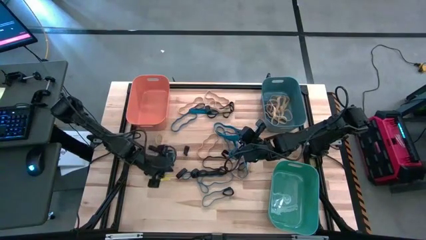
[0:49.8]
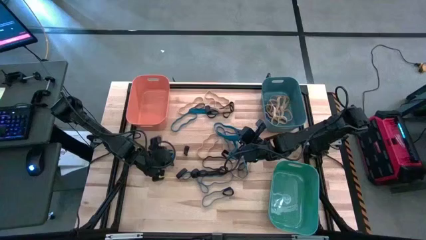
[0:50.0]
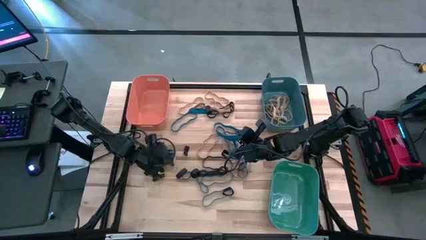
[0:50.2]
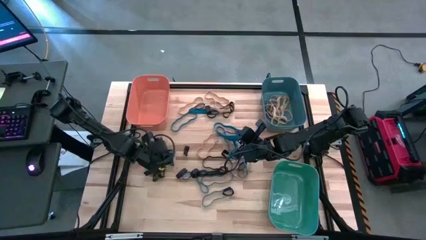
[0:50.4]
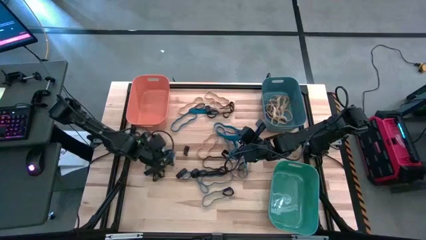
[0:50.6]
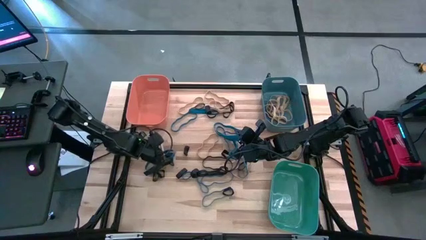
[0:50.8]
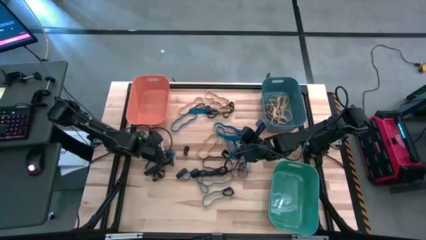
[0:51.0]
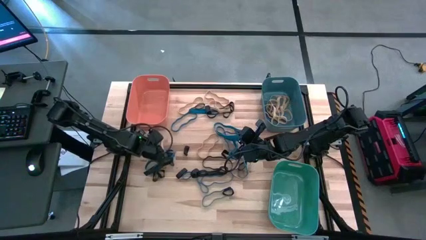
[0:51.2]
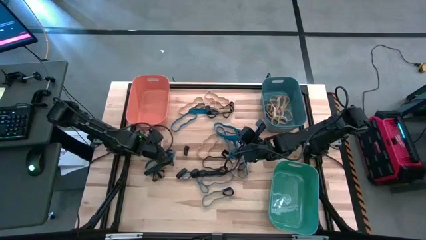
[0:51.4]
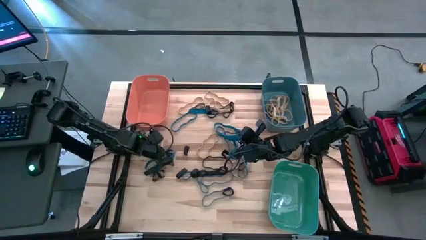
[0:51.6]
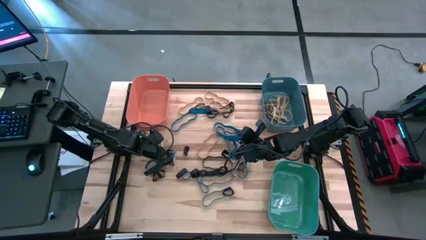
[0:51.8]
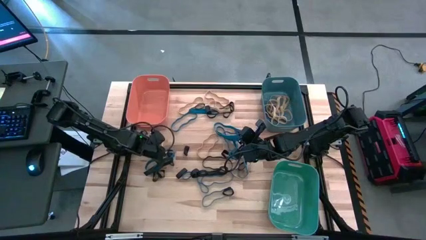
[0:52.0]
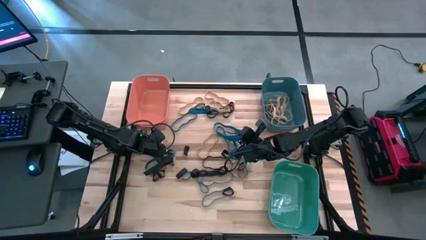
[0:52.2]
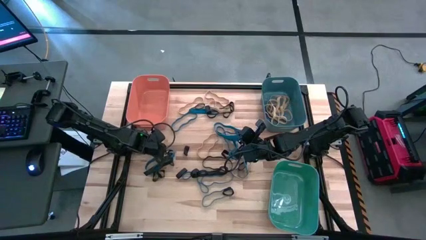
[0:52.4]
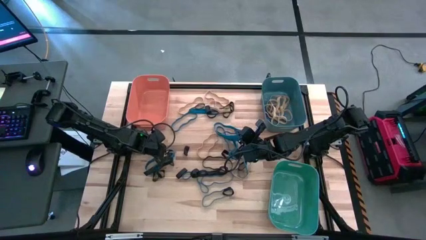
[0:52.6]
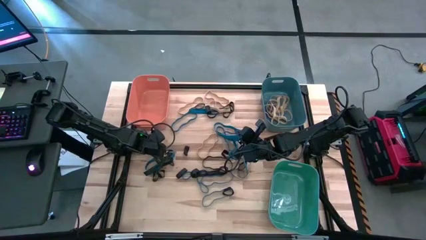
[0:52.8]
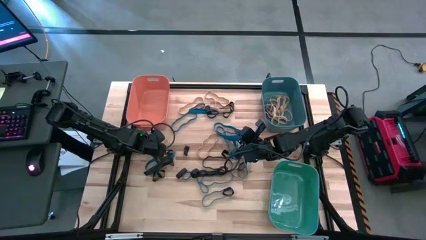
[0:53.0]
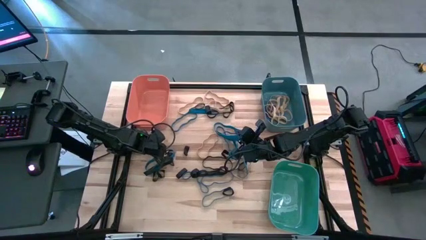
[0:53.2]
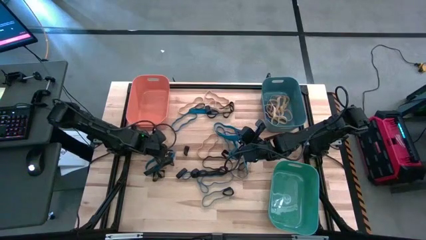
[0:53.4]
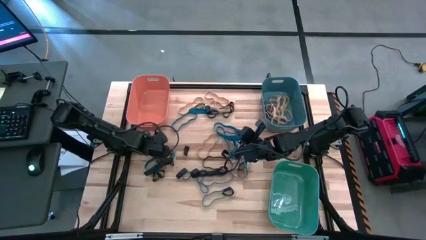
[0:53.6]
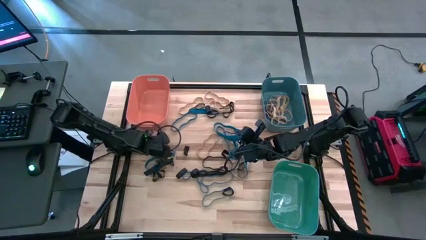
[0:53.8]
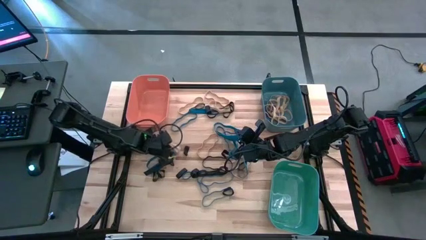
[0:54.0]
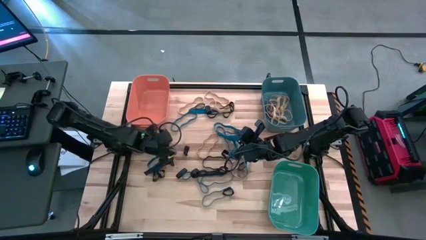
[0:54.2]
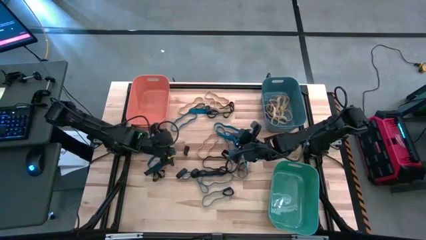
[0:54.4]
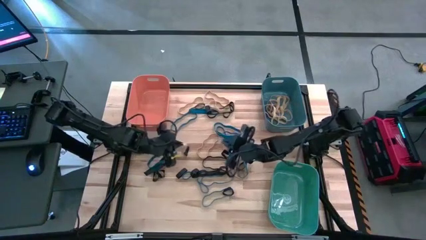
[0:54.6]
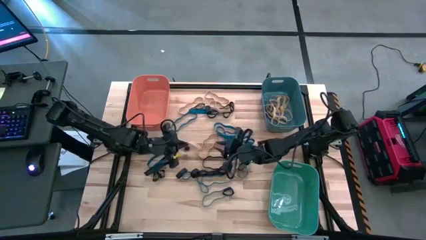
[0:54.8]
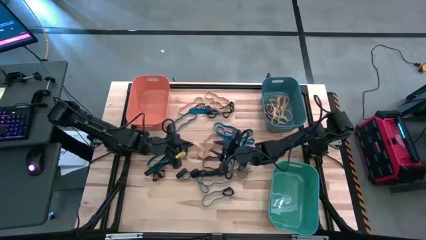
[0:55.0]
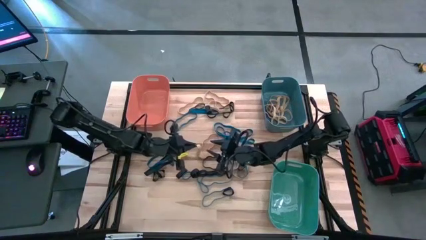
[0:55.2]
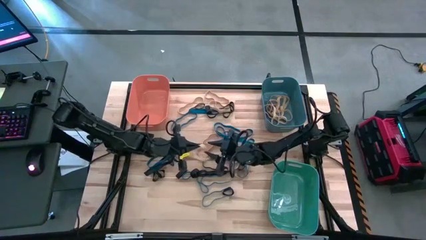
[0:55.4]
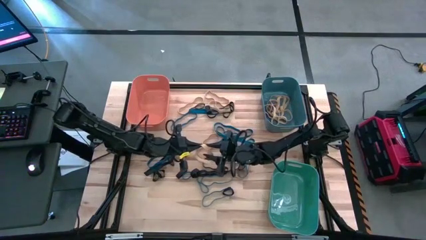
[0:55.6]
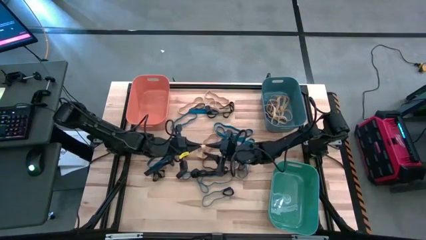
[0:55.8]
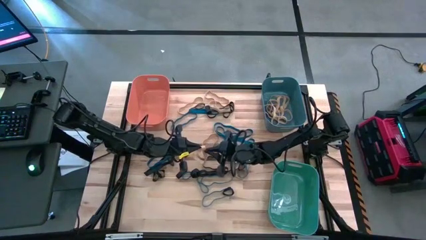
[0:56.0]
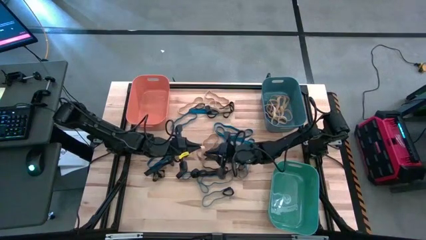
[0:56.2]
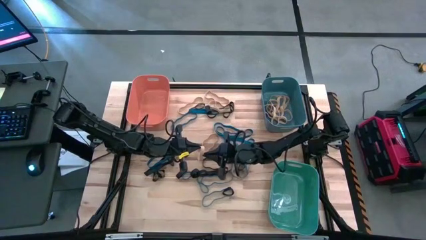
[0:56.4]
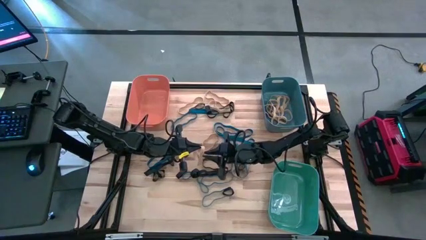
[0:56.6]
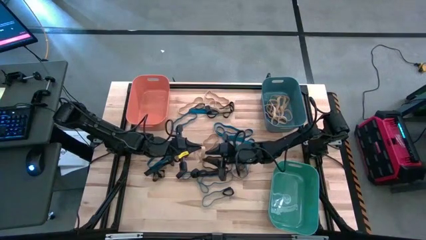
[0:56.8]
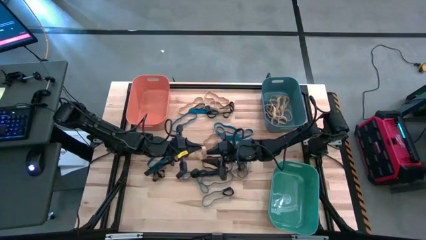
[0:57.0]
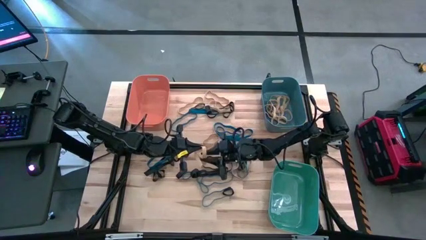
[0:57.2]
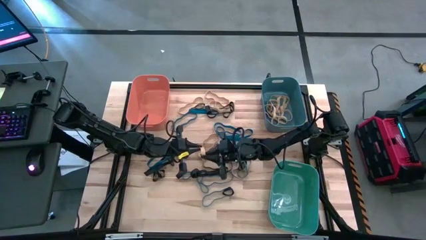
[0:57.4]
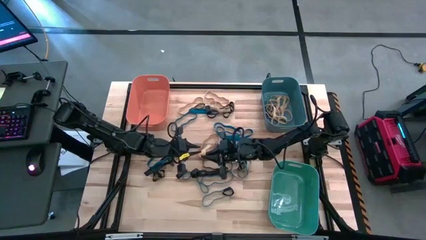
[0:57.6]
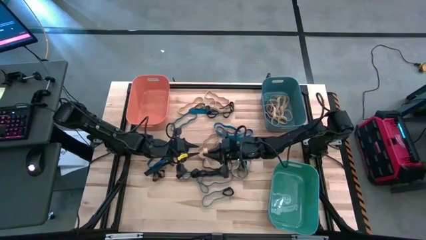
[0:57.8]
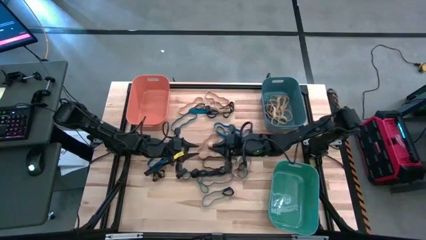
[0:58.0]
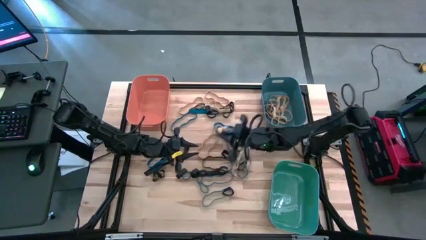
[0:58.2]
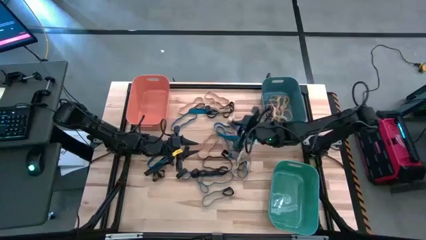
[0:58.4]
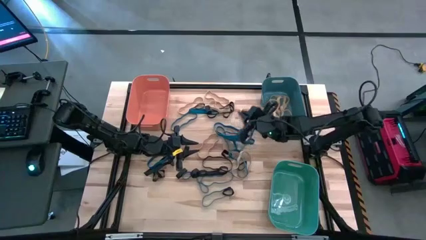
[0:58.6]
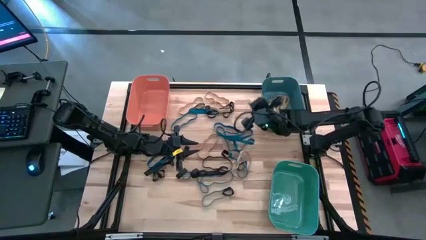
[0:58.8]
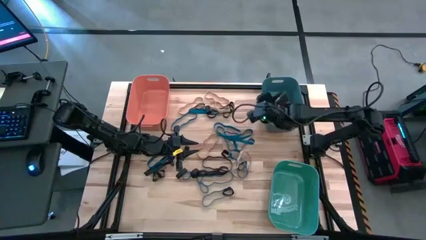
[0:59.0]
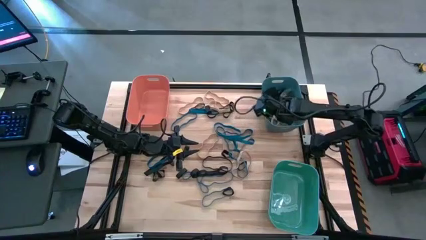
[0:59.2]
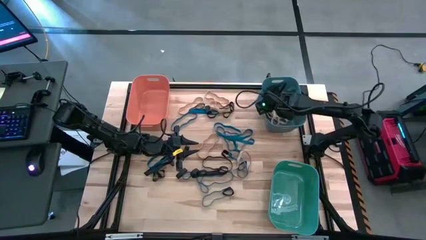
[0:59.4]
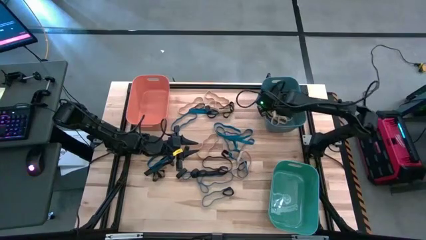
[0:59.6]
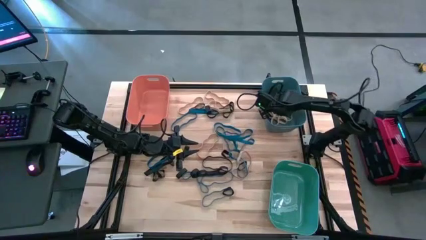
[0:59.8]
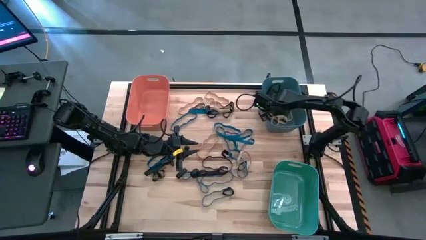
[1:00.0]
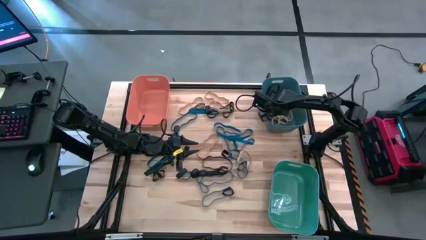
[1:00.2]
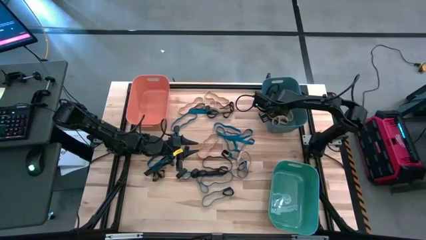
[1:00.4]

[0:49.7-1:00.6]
Task: Sort rubber bands into baskets
Put the white rubber band into the blue bin

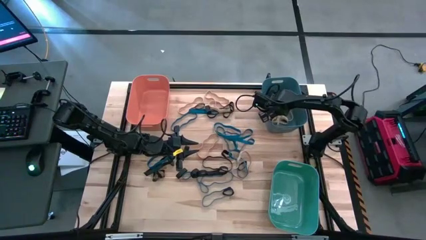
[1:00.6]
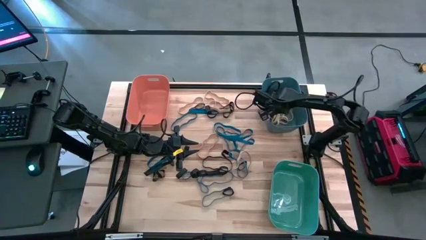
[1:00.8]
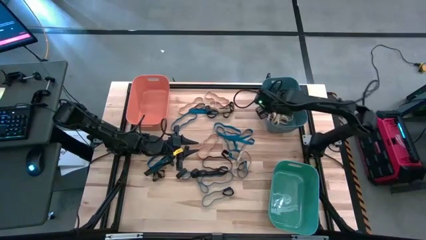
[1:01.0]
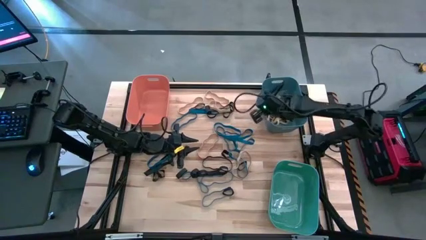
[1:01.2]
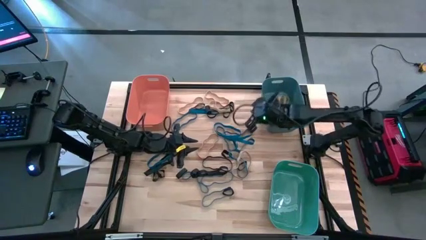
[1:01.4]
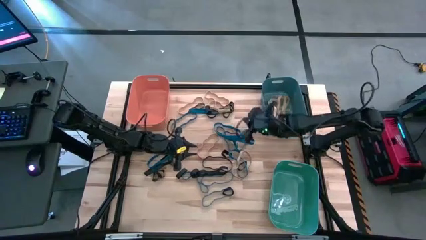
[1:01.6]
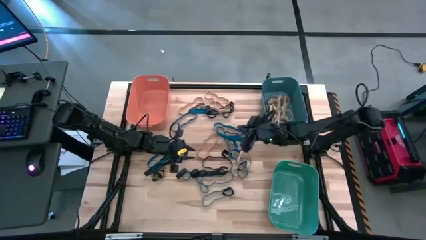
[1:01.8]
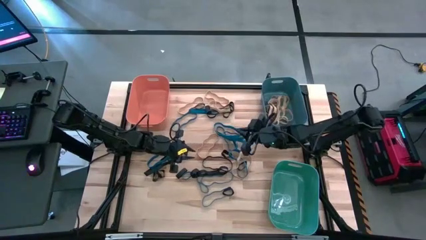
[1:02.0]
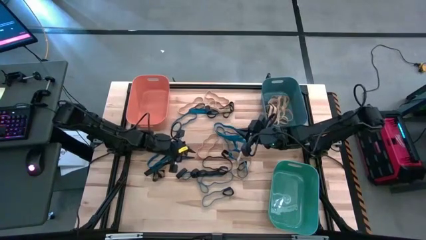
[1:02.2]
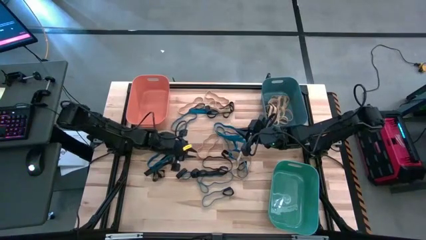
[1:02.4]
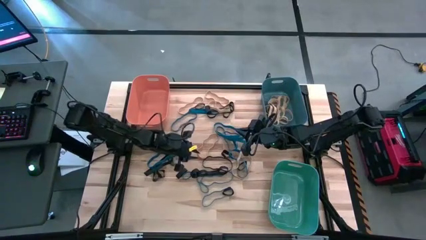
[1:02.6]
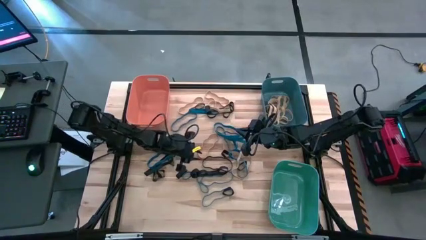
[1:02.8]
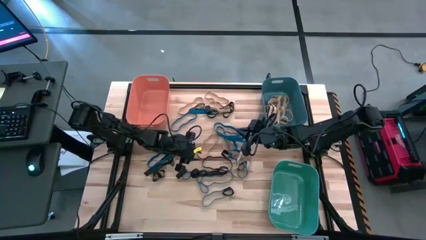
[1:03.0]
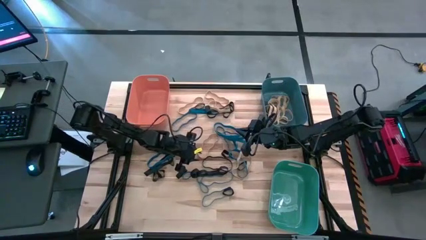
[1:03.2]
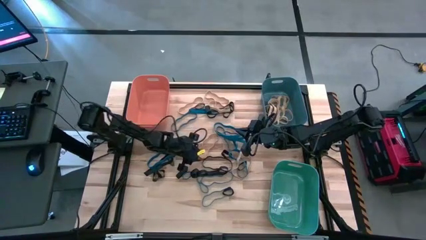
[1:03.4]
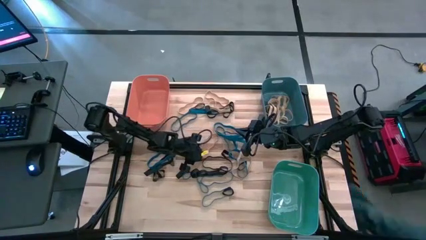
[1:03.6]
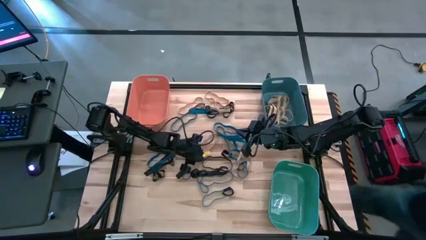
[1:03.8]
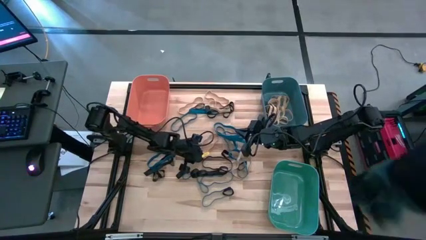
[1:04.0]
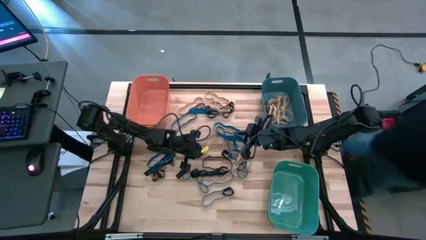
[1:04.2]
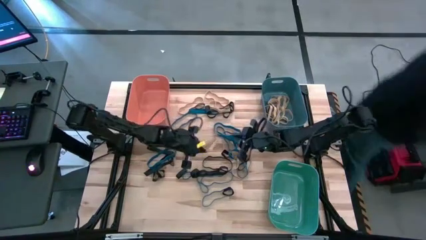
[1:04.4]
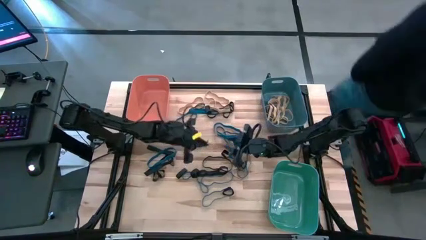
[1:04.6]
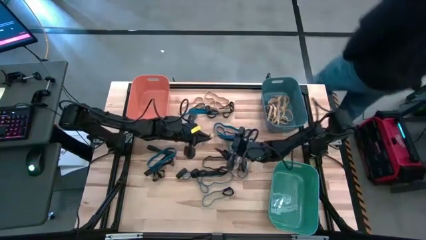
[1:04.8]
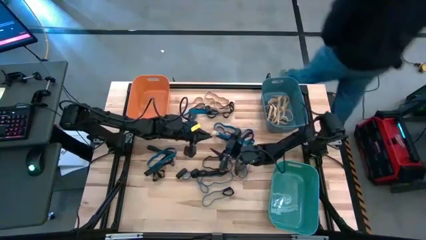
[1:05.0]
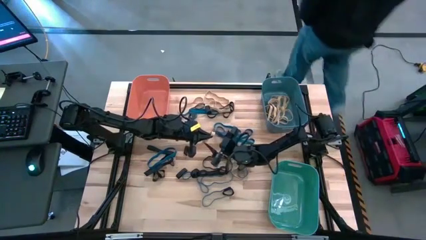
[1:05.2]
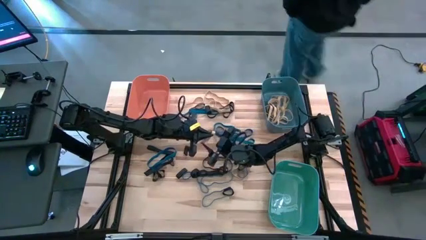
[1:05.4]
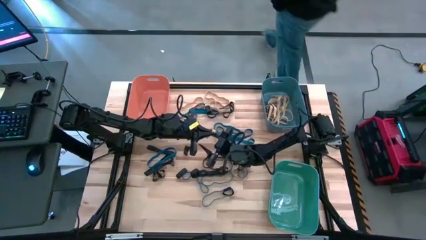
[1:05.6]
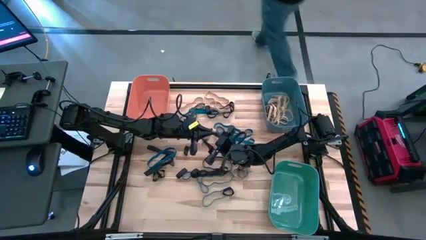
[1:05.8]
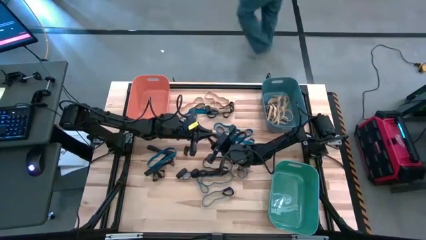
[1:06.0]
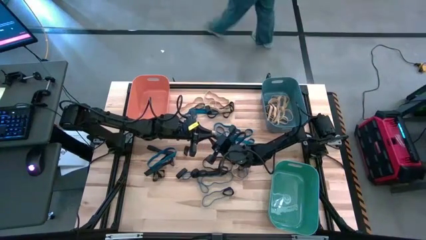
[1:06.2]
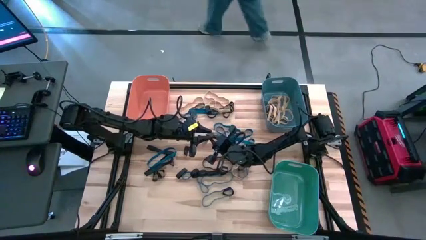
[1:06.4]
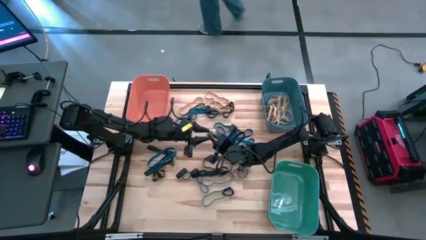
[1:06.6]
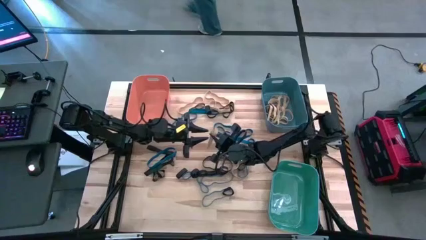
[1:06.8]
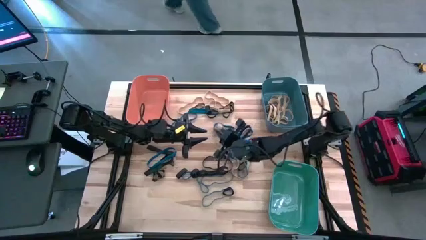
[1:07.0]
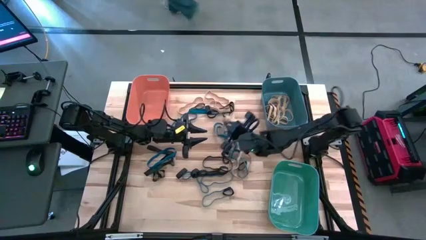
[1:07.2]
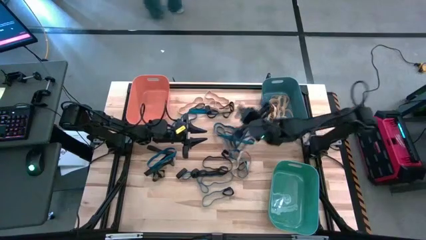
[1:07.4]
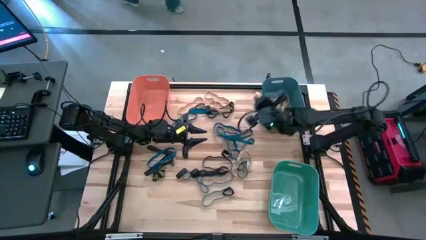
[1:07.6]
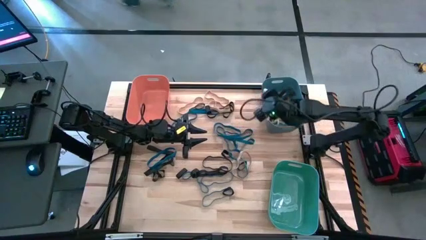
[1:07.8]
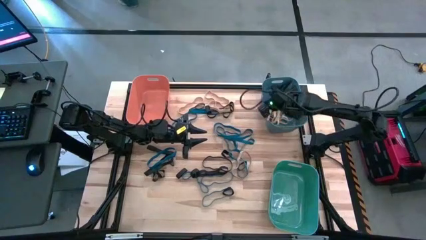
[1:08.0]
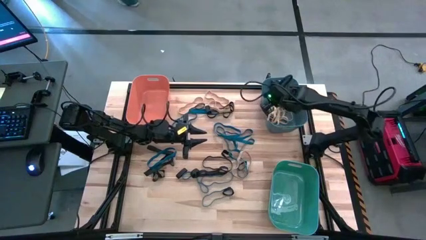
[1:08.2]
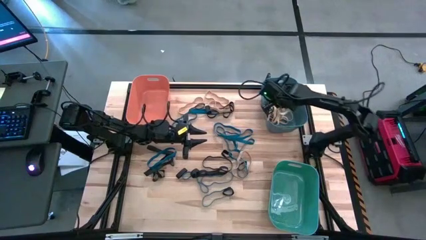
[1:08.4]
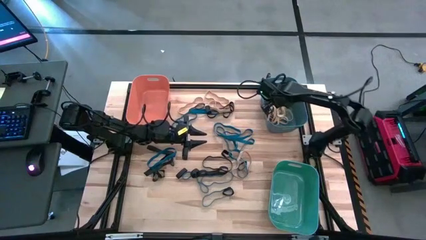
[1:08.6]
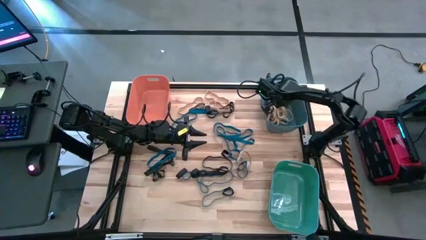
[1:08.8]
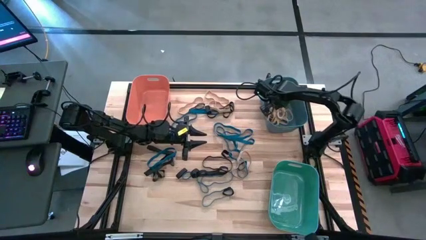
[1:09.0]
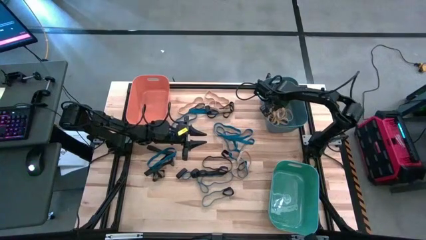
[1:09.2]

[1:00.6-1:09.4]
Put the white rubber band into the blue bin
